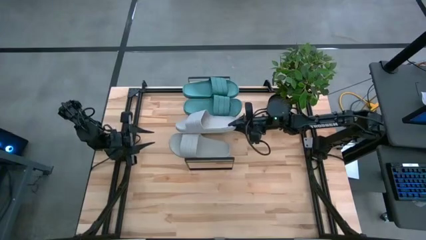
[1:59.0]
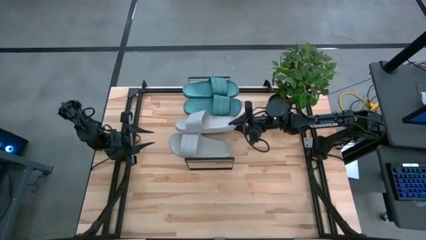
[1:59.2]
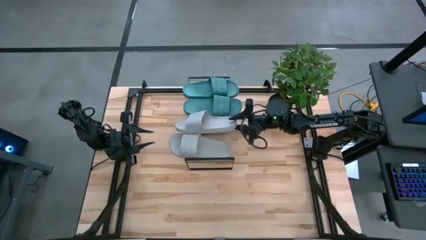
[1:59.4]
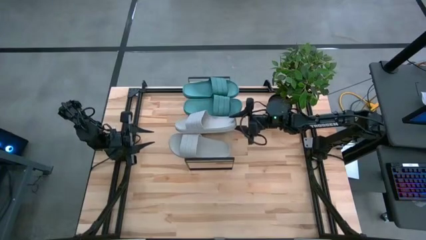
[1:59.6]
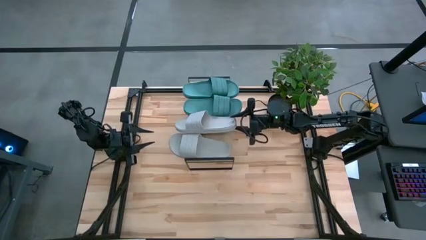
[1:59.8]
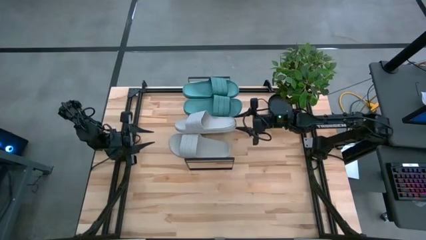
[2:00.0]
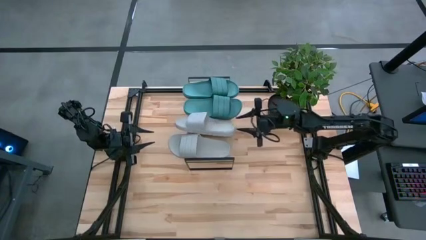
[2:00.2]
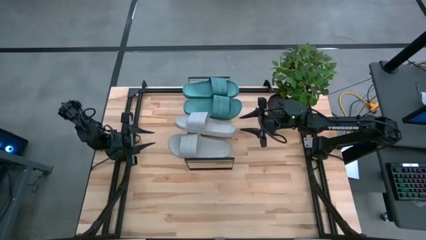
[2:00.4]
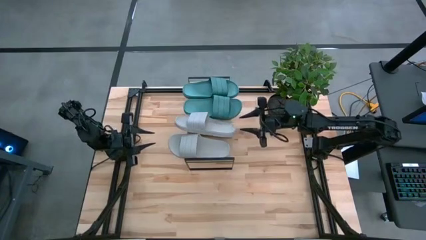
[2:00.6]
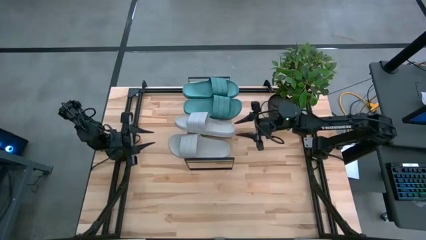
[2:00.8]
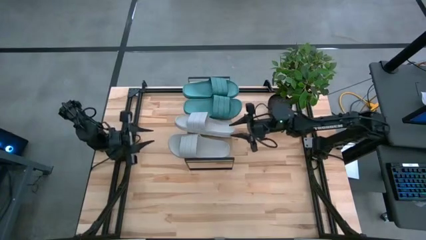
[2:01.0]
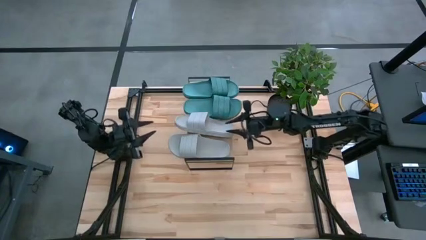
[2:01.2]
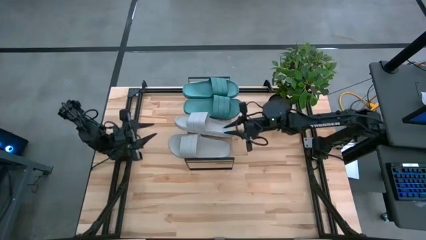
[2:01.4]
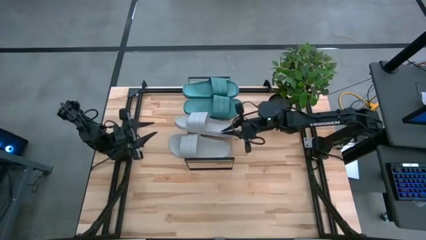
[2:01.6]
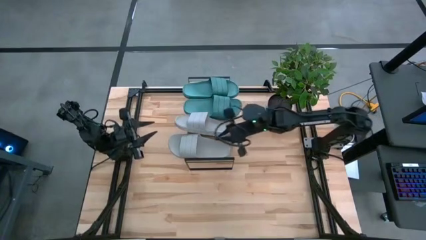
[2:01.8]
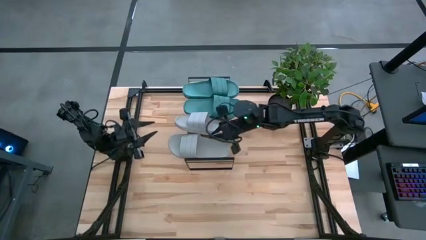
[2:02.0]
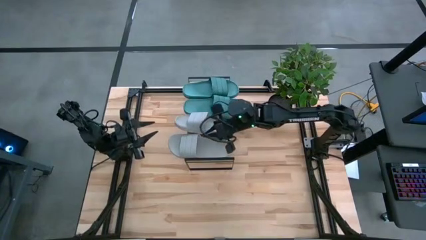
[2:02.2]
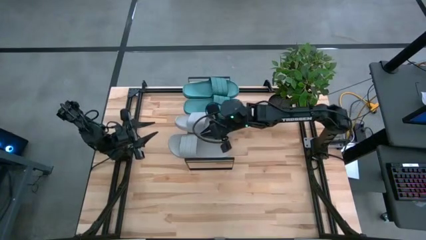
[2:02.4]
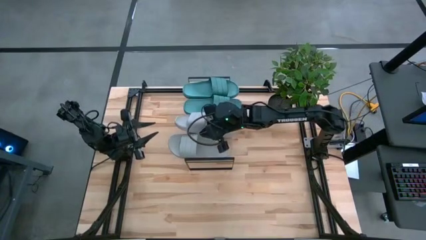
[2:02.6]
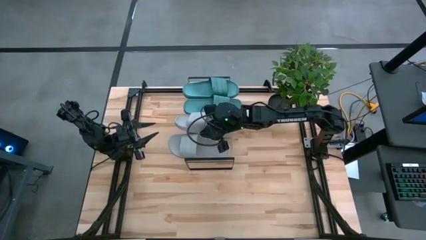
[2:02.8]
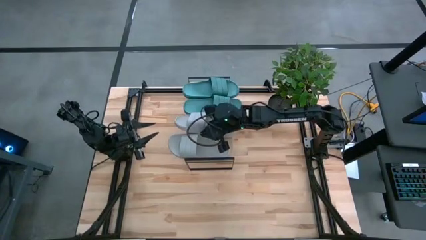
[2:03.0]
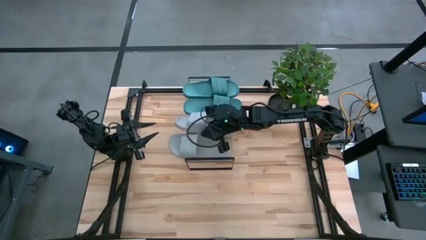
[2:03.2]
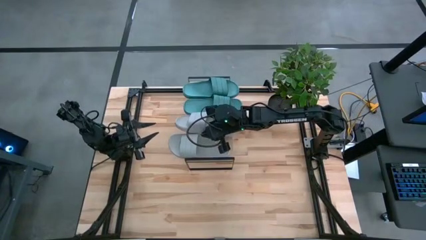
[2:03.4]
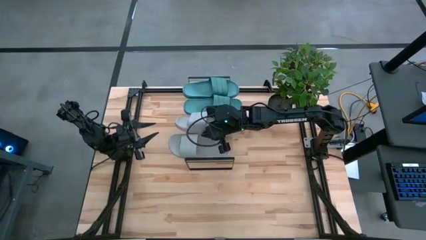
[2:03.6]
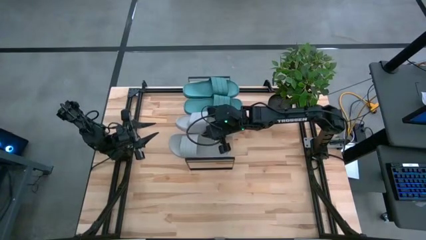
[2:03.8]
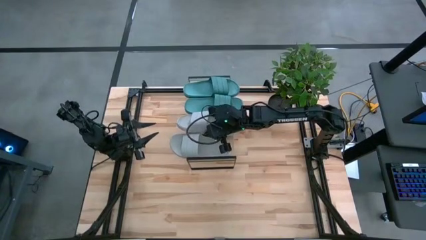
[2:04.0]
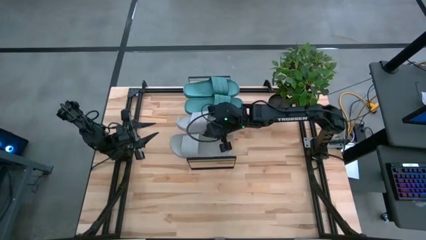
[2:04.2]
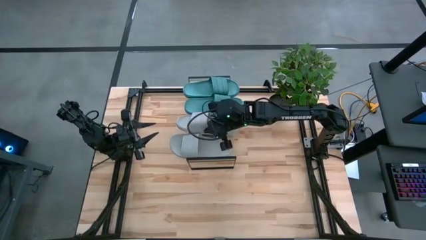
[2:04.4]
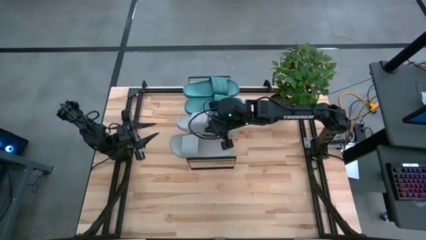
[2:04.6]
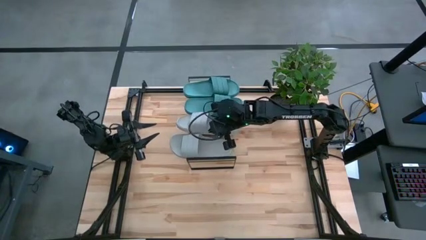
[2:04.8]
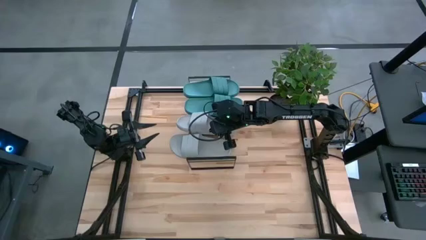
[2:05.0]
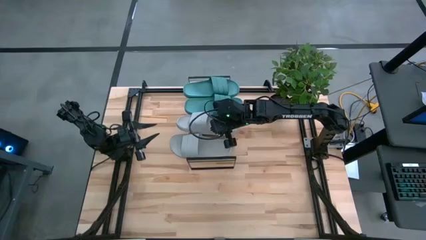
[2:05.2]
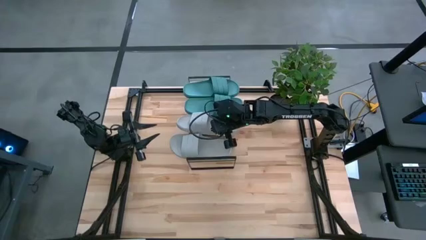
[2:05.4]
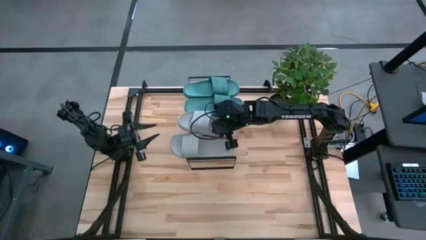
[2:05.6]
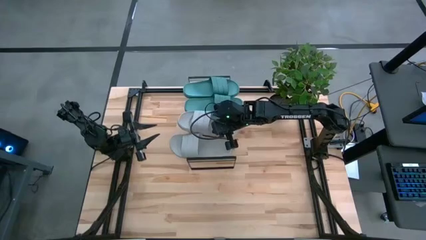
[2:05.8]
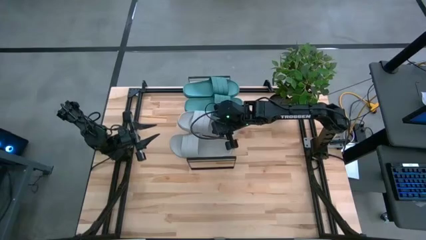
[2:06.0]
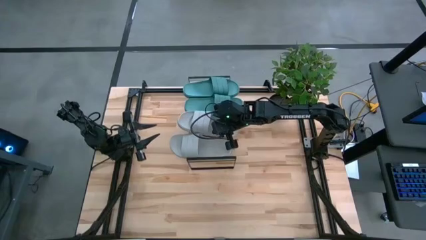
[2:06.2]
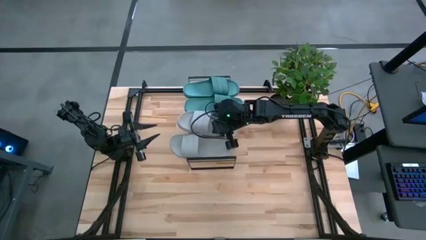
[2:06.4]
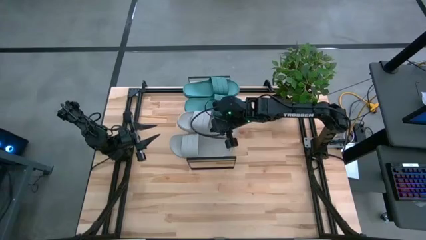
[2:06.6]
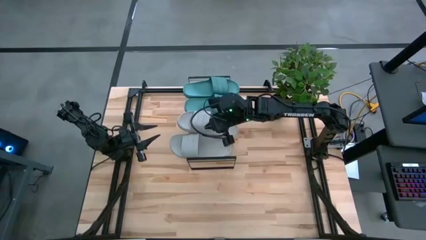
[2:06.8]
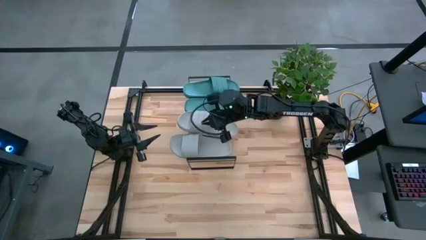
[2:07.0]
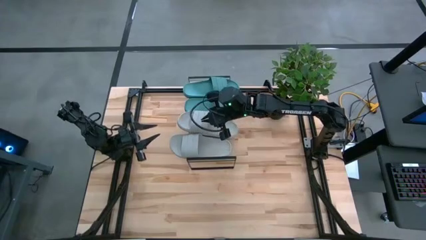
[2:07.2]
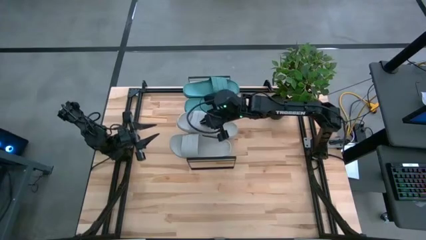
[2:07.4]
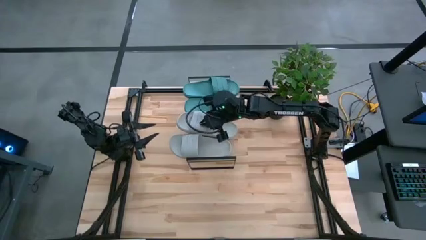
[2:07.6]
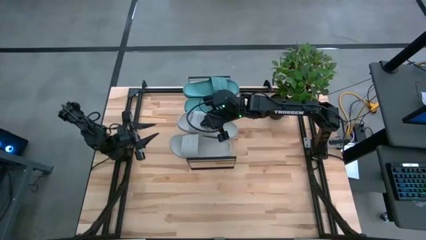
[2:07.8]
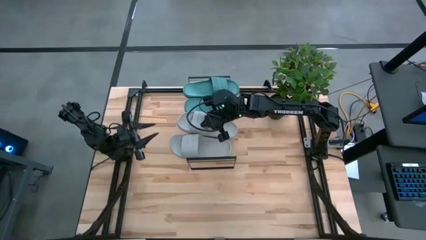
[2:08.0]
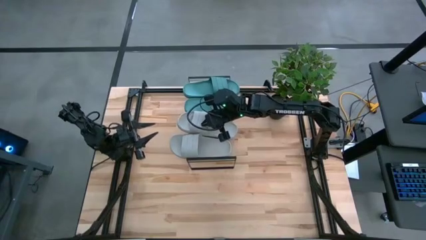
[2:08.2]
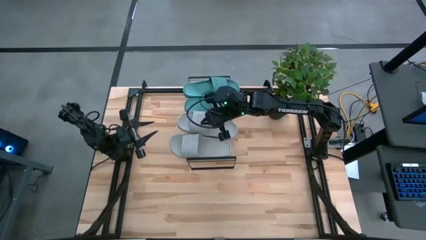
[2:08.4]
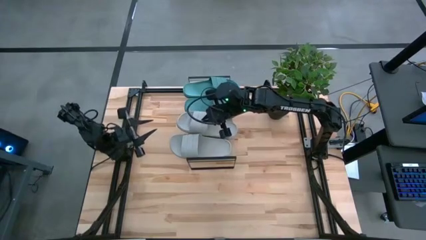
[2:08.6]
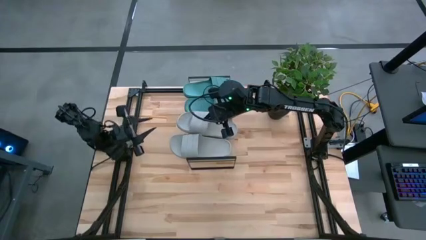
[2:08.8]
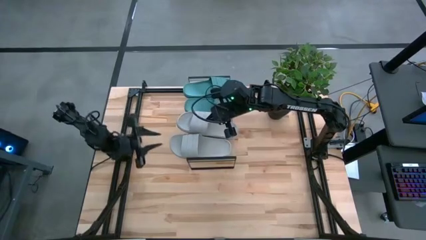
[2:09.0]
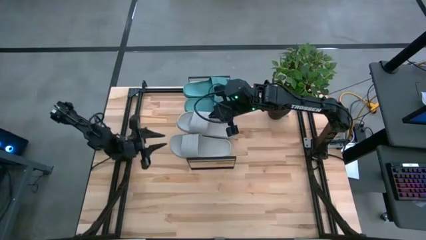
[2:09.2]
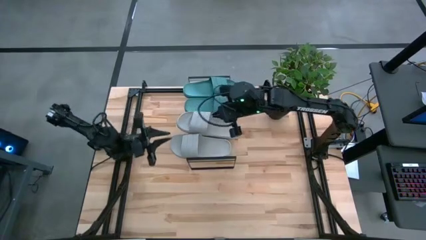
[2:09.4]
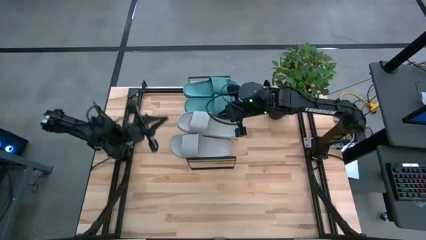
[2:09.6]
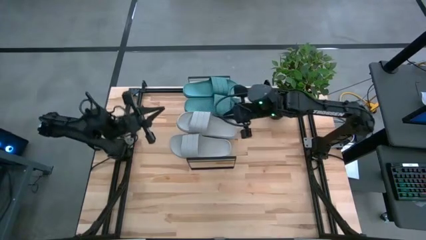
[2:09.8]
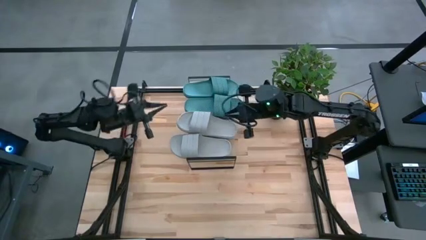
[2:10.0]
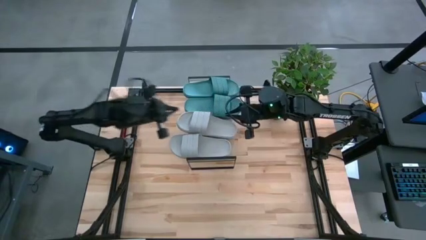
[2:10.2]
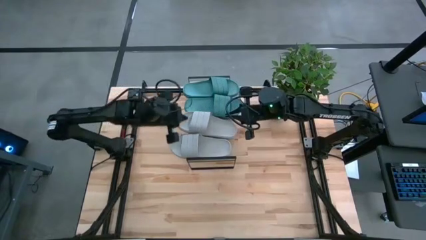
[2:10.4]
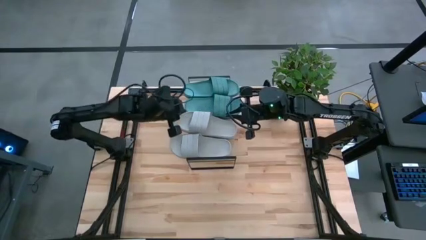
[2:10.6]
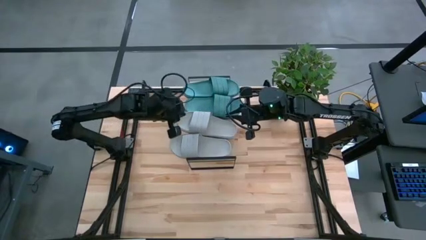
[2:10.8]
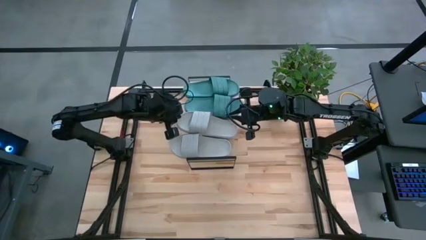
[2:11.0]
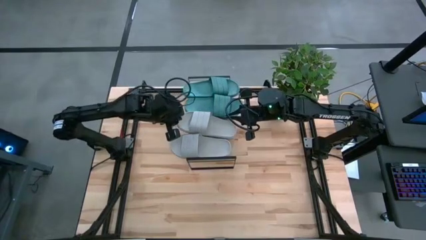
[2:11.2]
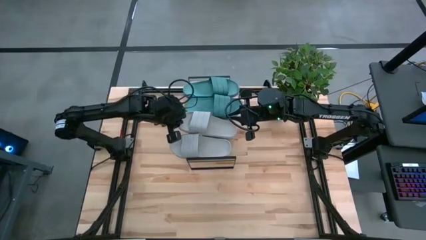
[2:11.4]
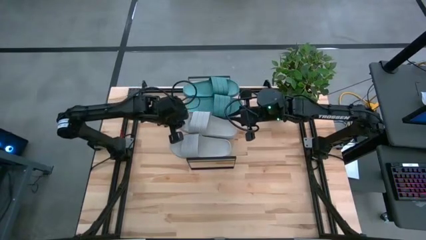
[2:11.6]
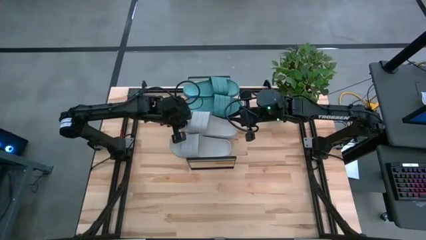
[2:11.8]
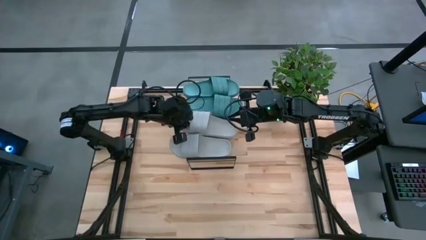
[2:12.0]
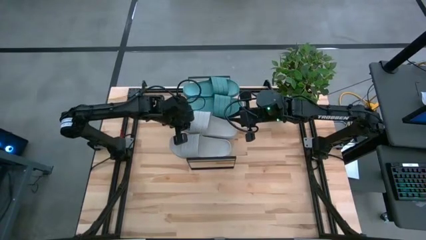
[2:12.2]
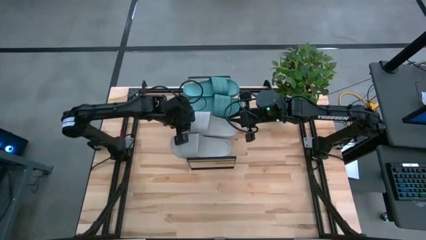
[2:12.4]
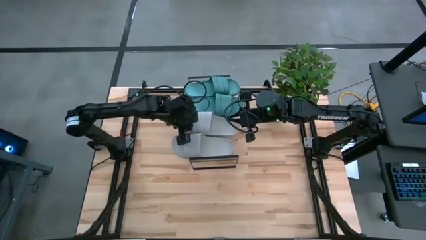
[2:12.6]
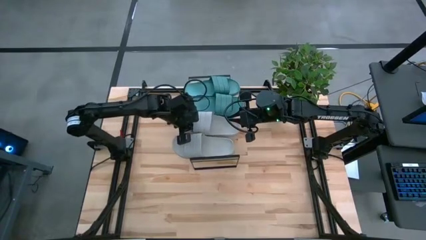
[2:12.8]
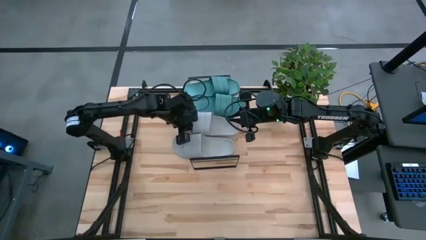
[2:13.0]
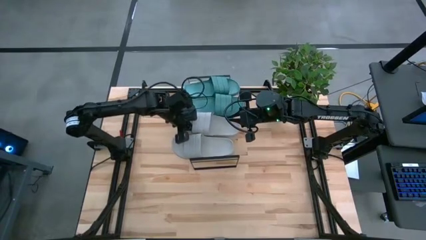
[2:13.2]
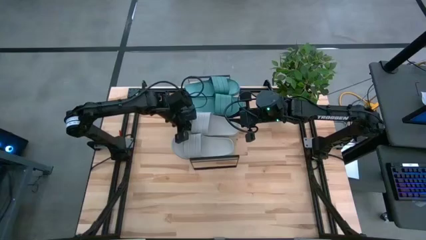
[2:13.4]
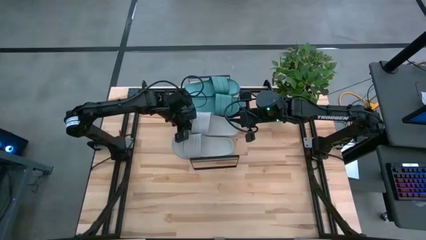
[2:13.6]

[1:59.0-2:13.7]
Task: Pick and place slides into the shelf
Put the gray slide on the shelf
